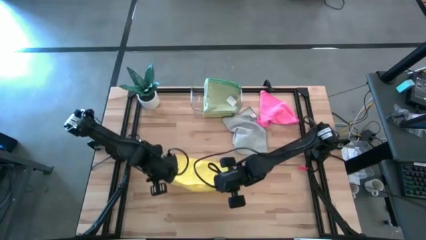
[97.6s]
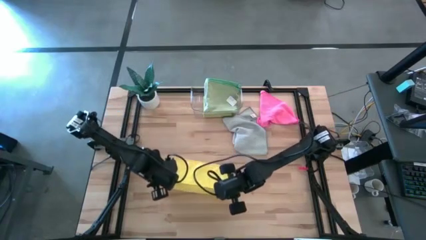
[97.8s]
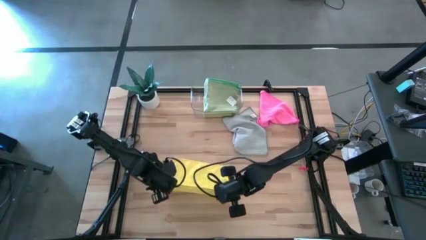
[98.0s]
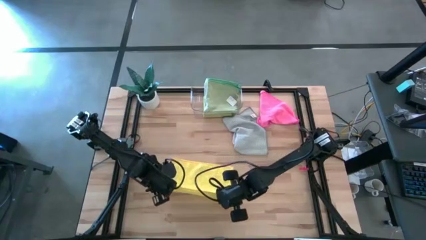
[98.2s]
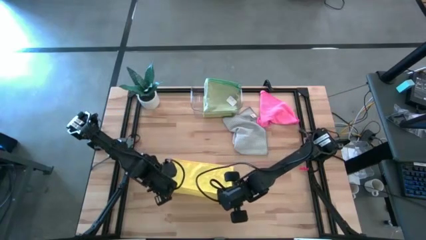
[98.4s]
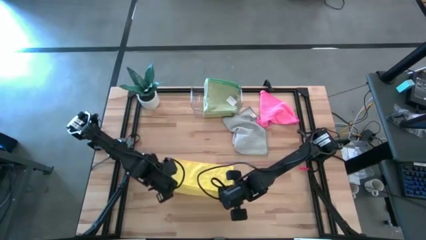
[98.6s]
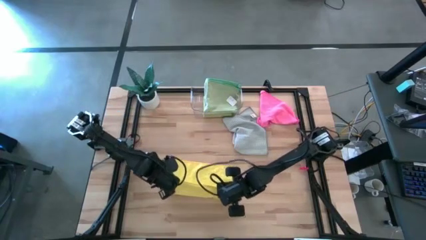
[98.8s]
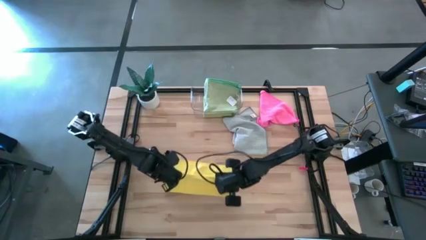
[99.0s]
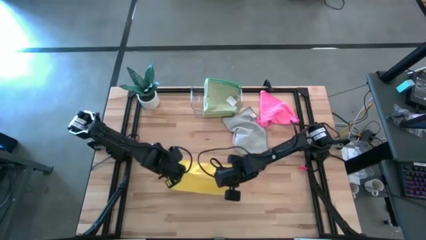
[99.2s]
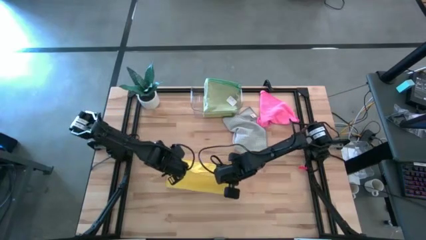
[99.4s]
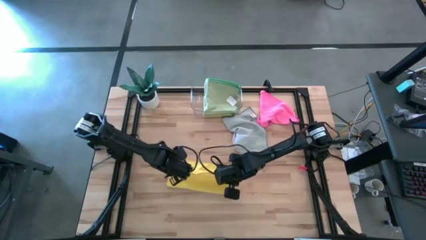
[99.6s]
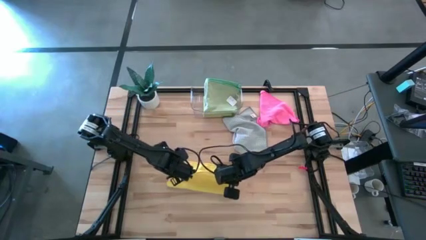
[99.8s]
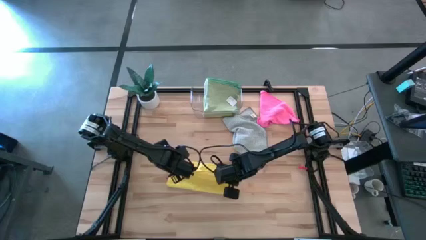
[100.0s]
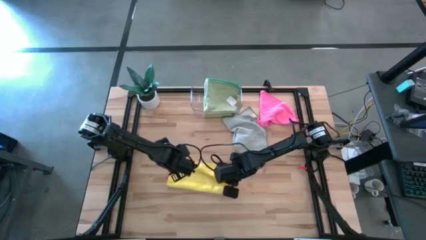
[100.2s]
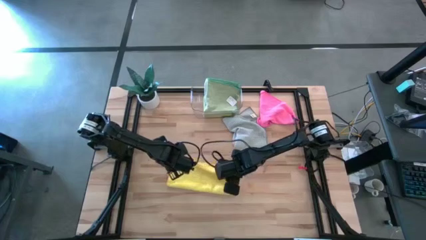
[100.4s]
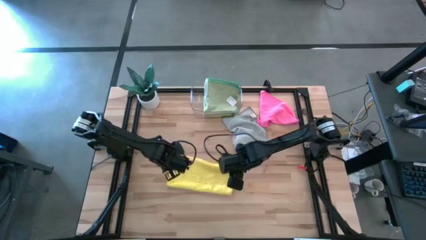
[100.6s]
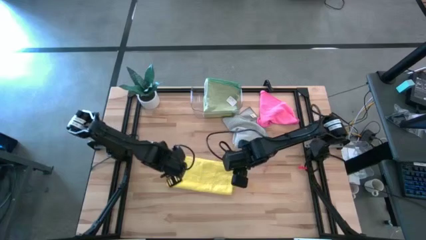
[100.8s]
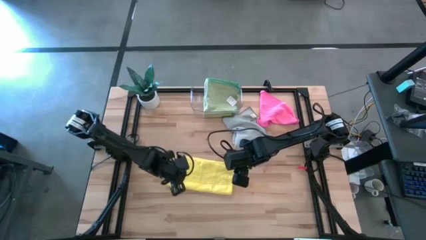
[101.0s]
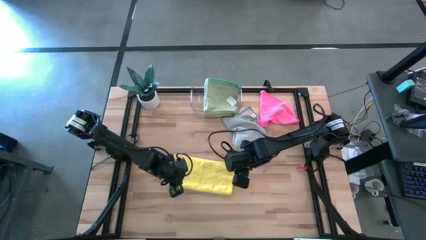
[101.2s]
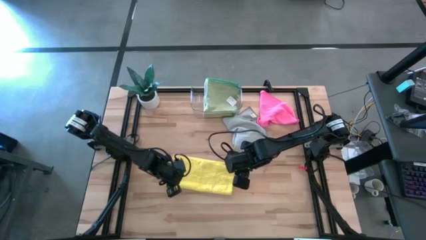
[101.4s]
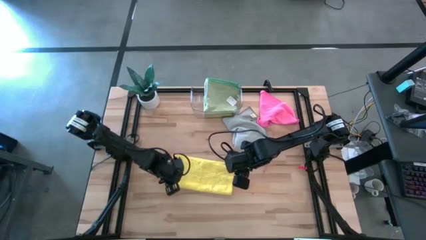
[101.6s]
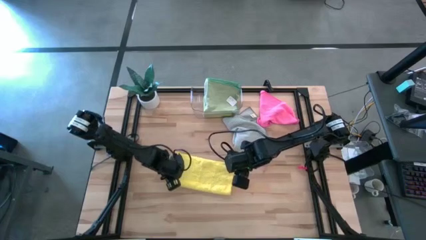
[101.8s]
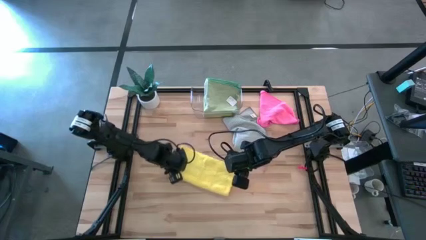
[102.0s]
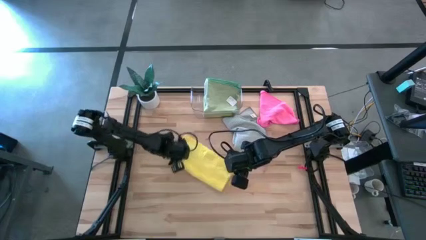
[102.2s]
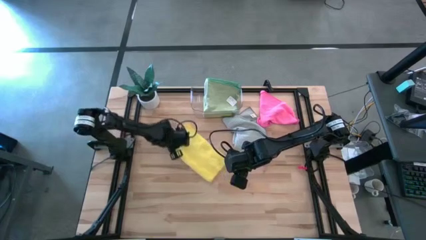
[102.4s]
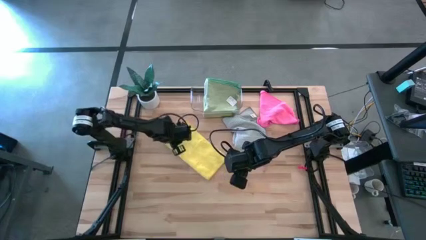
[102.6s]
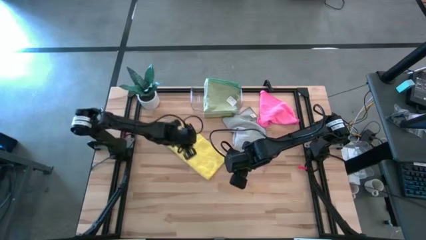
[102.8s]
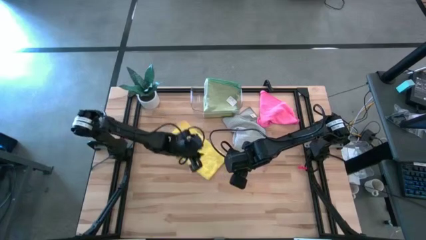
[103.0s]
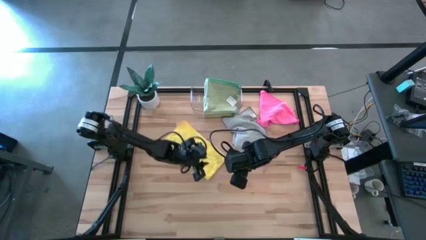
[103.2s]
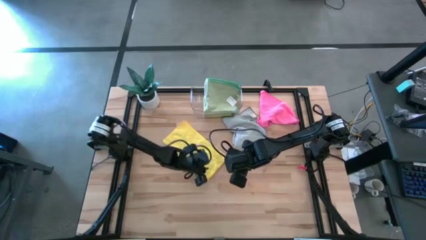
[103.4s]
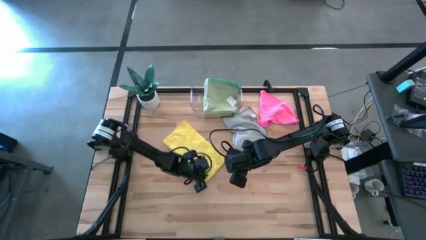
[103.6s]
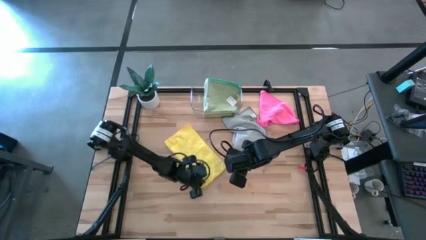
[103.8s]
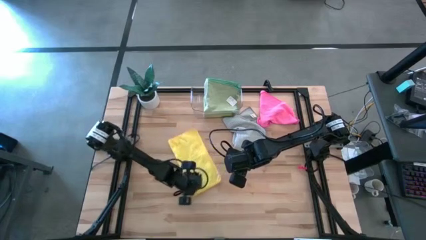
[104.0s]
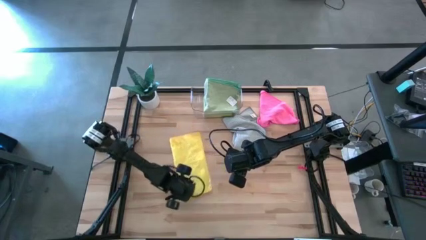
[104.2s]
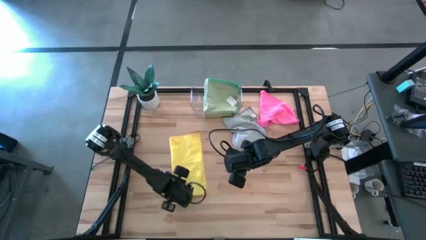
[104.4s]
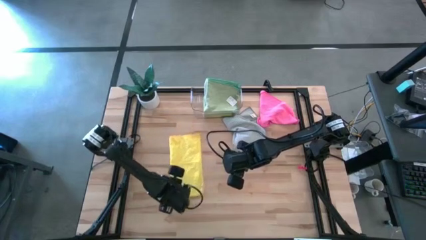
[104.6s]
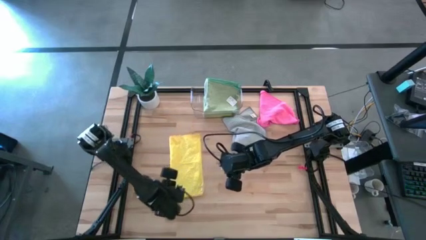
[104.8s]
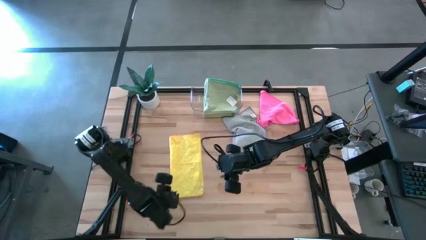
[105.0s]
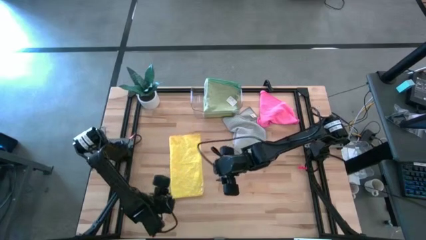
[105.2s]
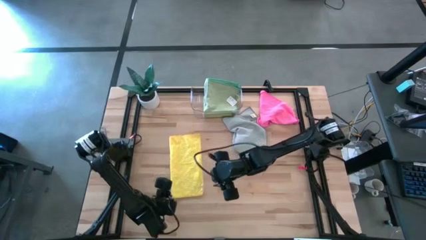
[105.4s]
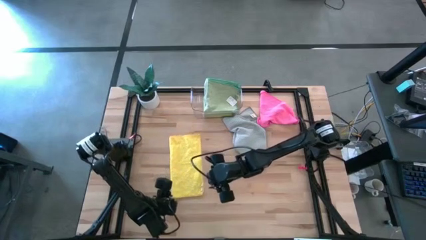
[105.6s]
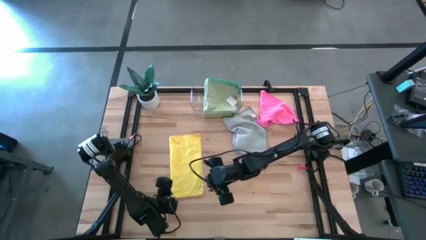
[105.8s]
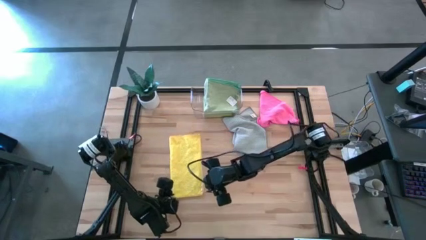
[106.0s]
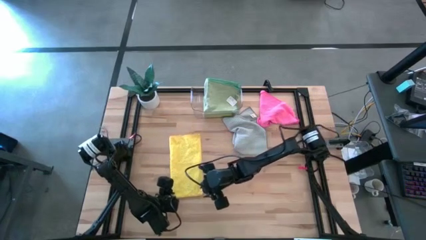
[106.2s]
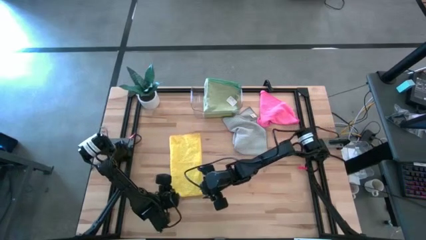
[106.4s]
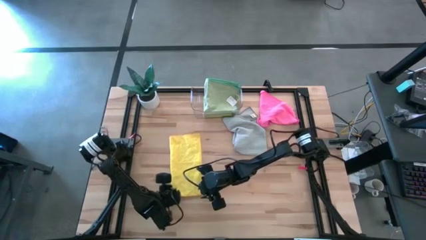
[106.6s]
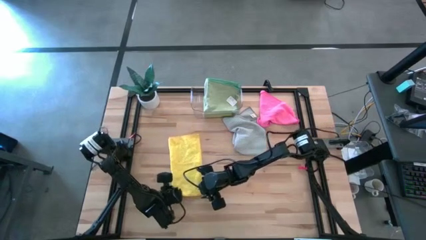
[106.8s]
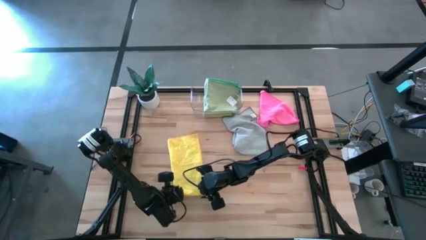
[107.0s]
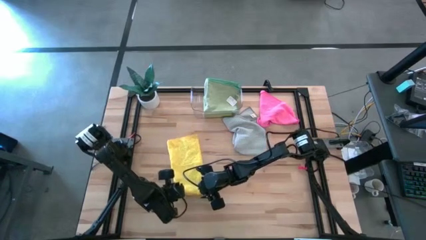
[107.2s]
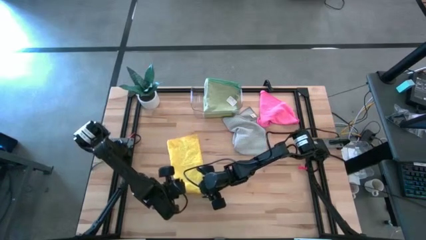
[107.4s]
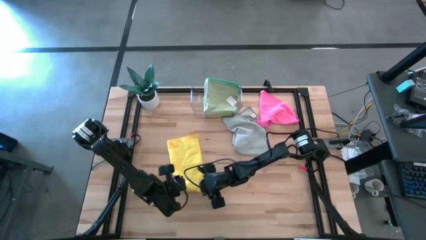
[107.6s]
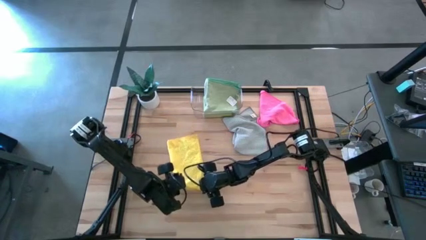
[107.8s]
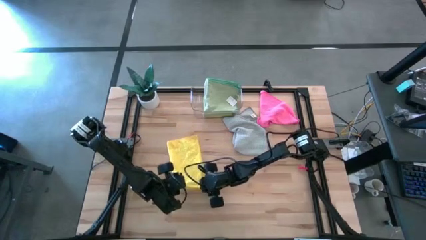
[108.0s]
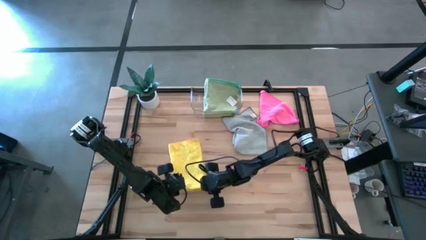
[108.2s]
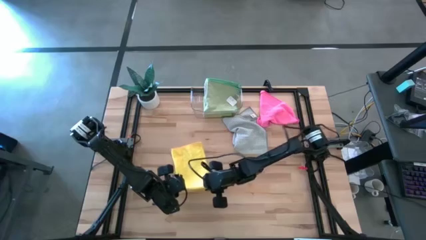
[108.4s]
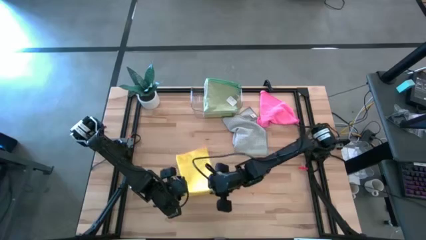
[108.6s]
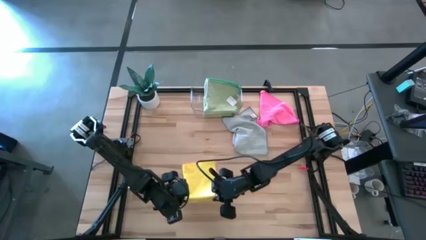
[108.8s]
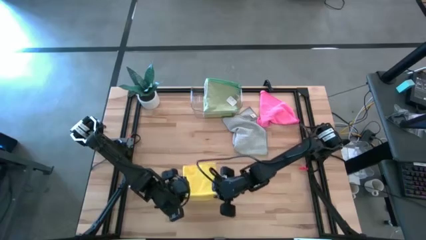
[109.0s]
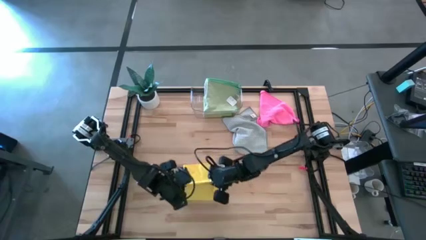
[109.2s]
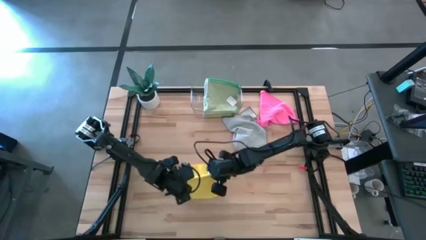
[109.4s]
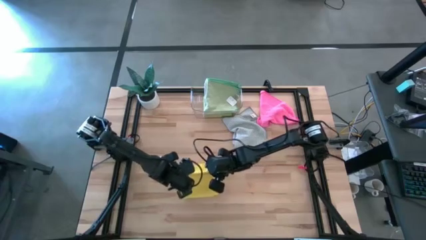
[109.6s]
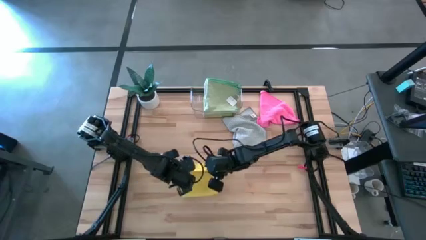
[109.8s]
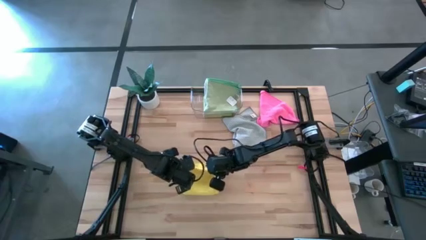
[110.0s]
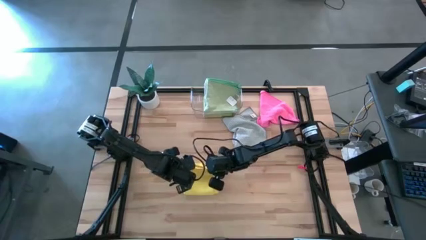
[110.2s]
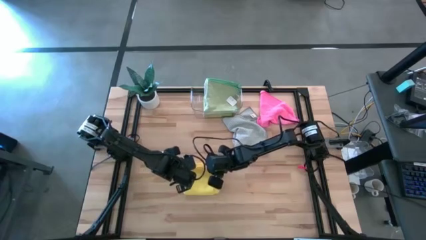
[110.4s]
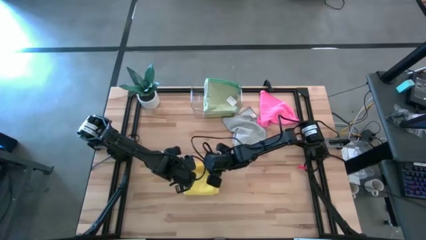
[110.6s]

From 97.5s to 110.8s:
Task: Fold microfiber towels
Fold the yellow microfiber cloth

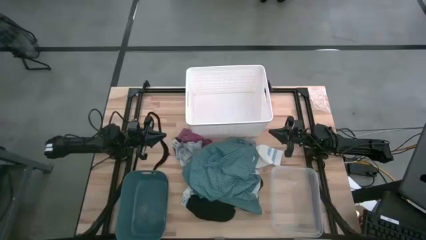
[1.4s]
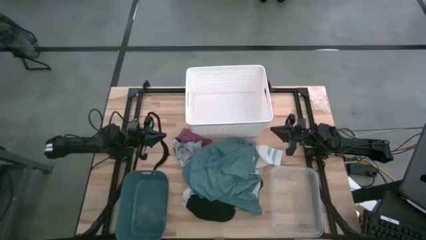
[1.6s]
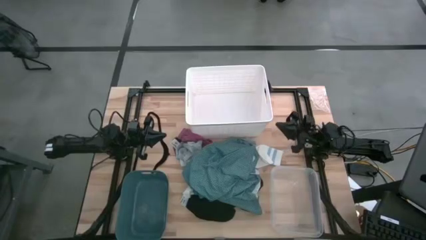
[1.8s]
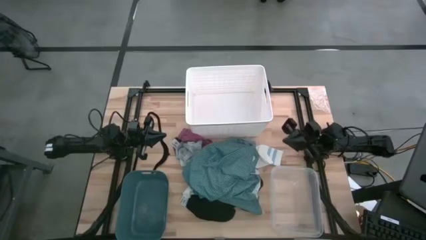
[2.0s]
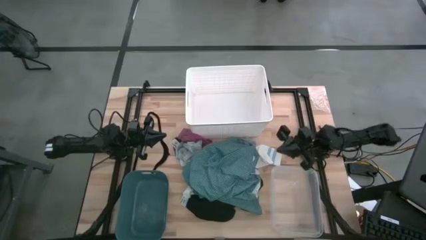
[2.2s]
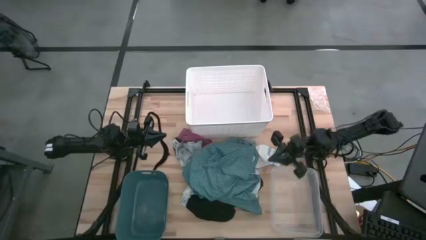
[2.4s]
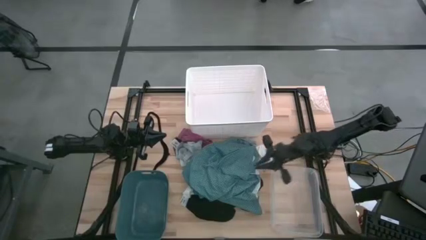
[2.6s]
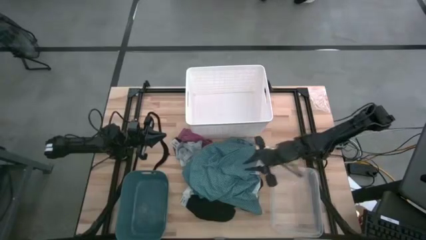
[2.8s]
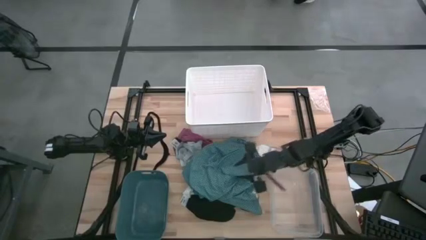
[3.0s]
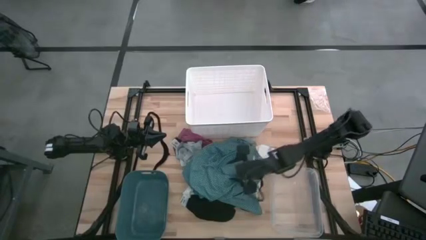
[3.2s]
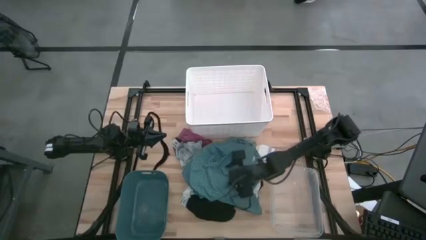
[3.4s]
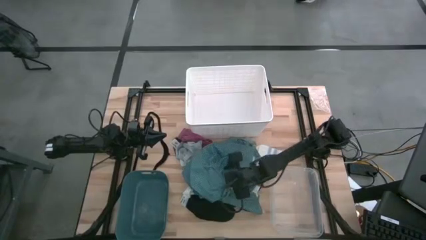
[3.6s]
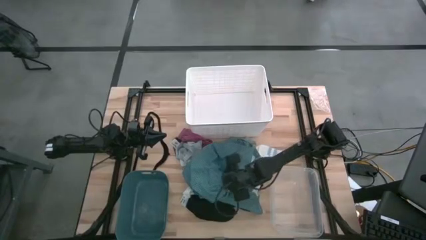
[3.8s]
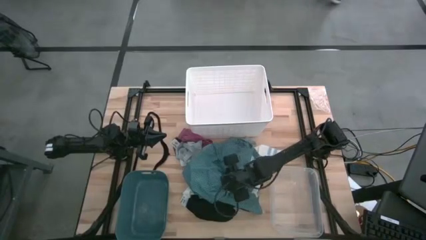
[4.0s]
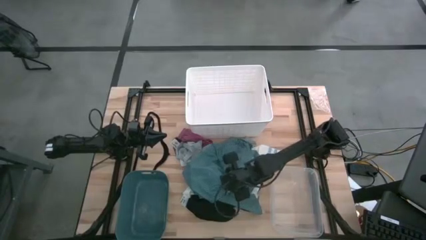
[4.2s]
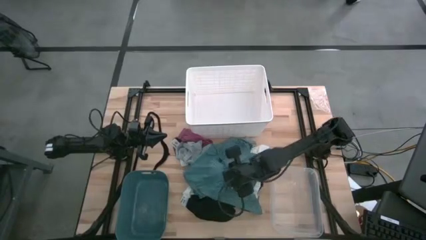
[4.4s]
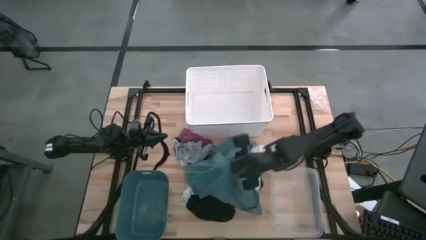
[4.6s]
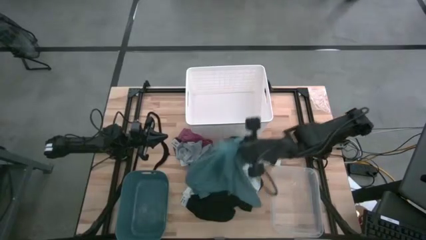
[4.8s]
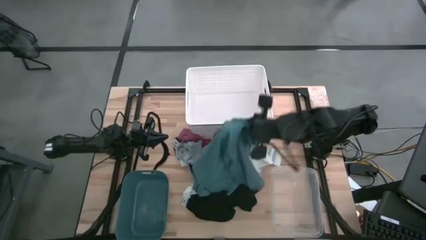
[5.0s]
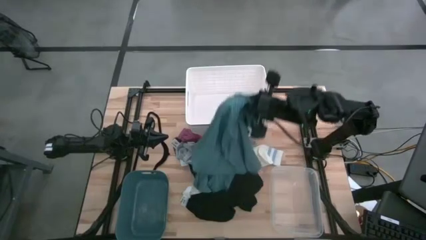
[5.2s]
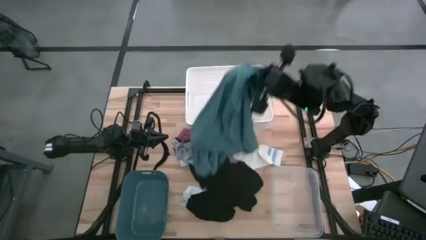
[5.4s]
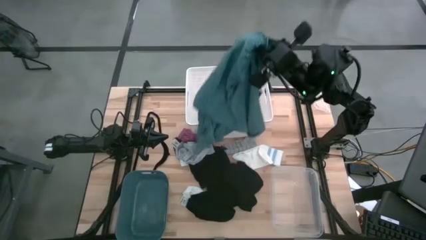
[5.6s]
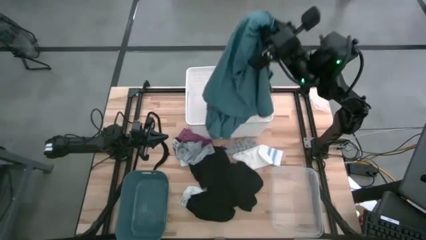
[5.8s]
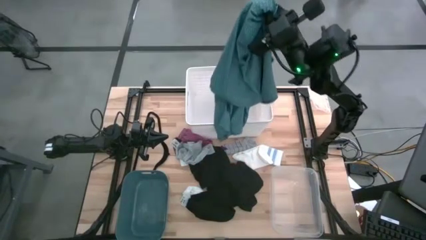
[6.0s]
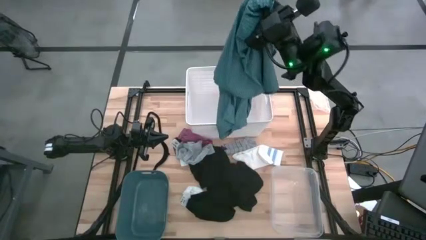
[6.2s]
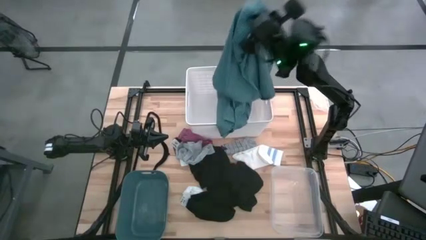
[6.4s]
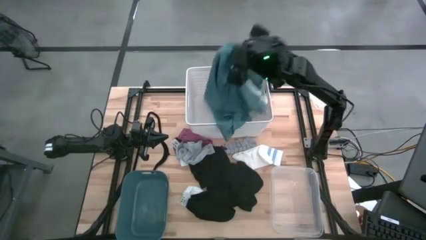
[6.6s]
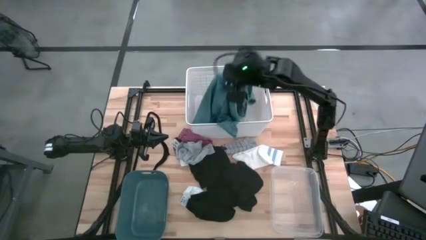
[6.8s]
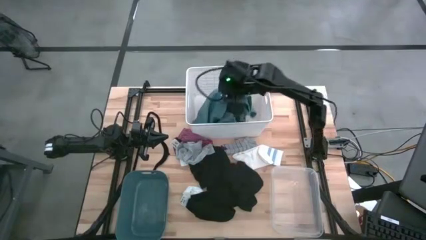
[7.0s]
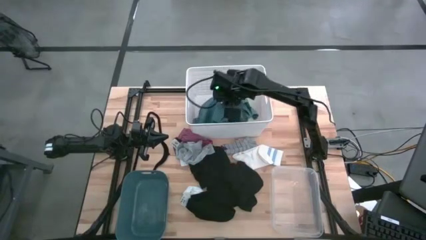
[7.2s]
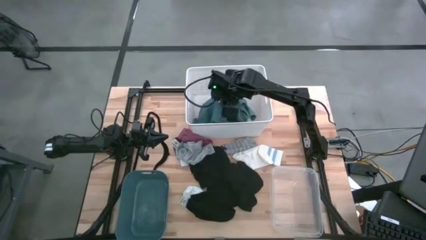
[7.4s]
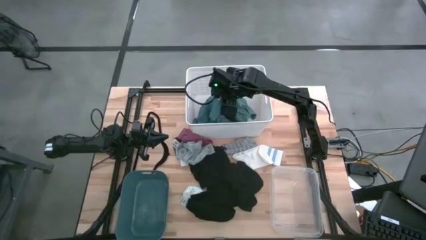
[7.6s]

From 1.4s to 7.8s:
Task: Pick & Place Cloths
Put the blue polo shirt into the white laundry bin
